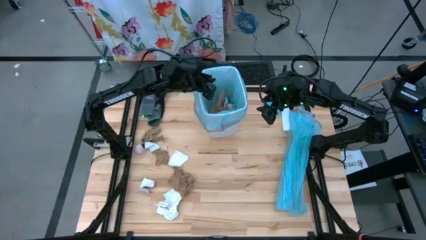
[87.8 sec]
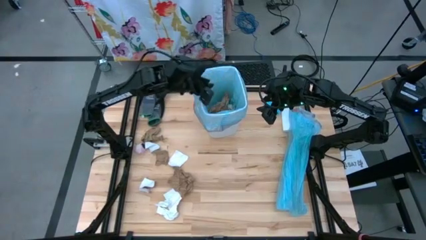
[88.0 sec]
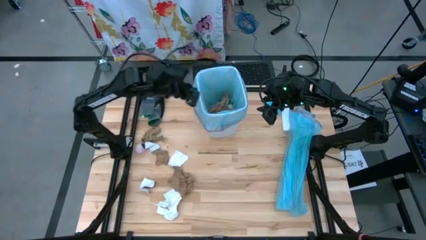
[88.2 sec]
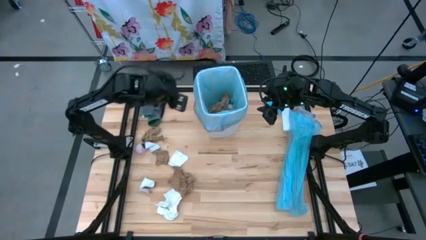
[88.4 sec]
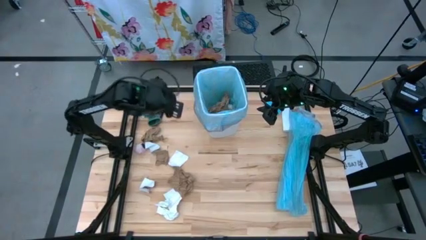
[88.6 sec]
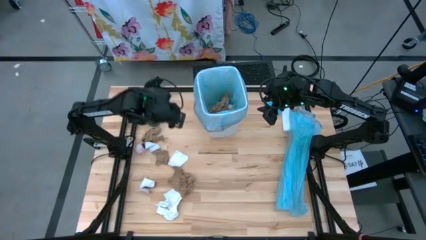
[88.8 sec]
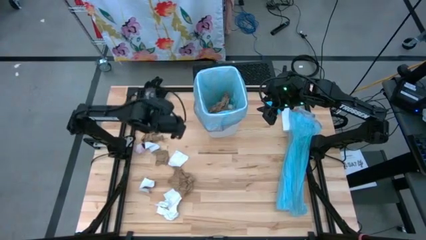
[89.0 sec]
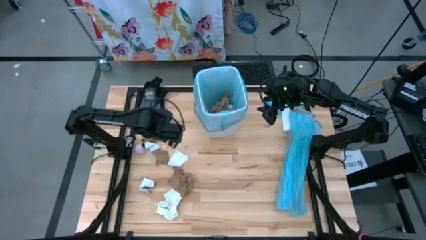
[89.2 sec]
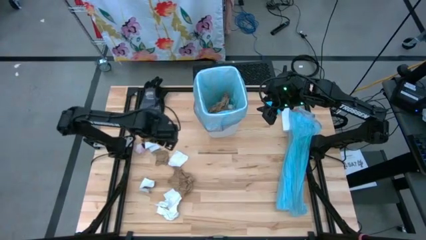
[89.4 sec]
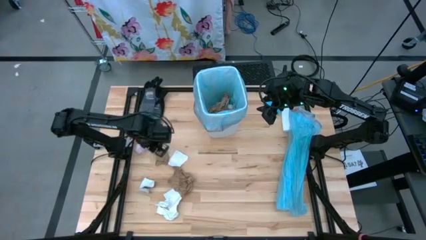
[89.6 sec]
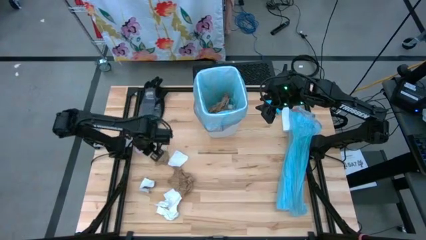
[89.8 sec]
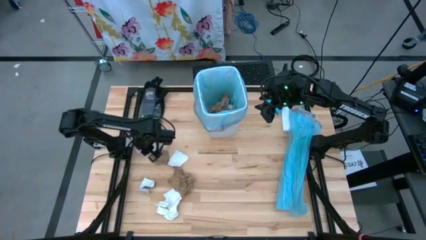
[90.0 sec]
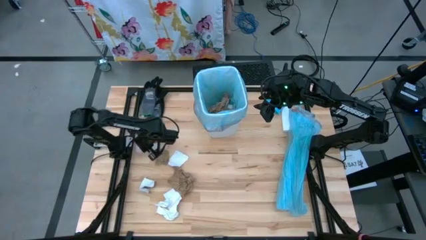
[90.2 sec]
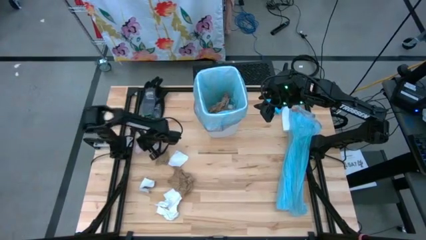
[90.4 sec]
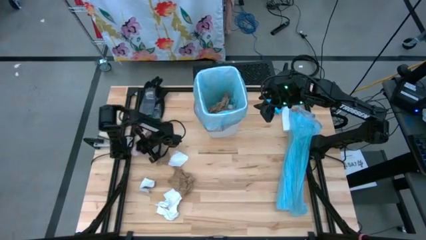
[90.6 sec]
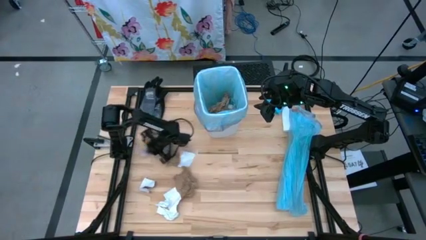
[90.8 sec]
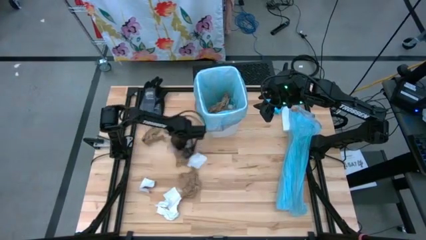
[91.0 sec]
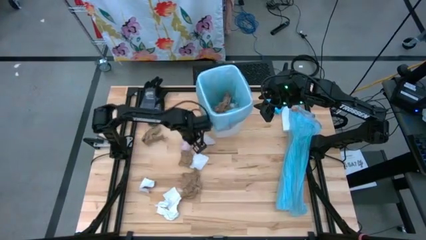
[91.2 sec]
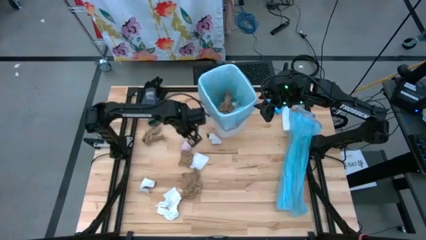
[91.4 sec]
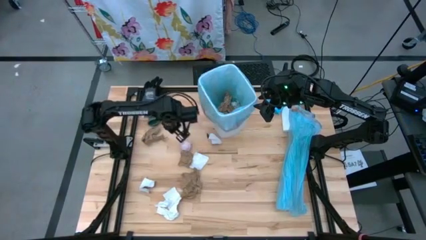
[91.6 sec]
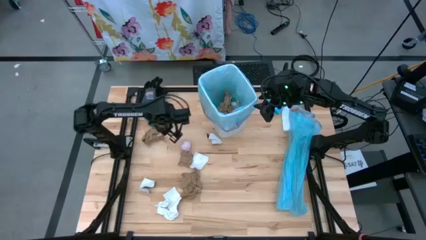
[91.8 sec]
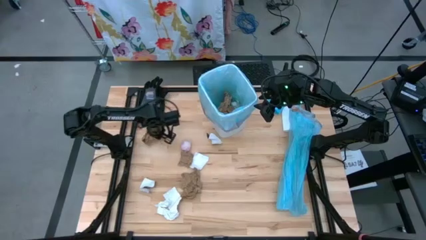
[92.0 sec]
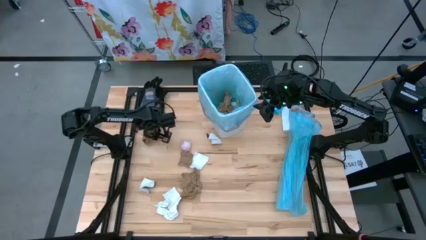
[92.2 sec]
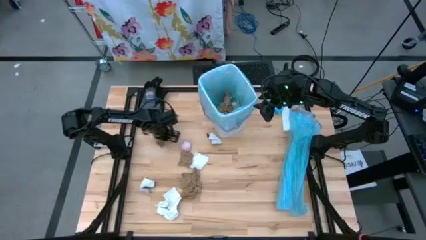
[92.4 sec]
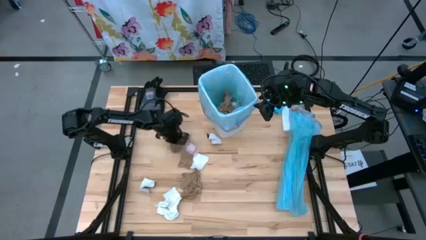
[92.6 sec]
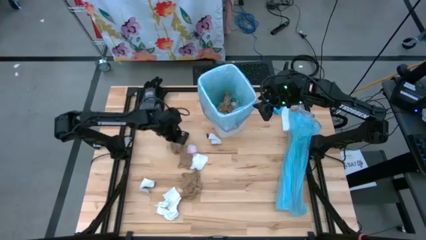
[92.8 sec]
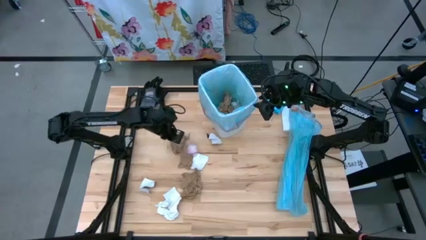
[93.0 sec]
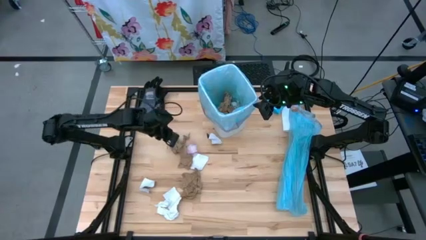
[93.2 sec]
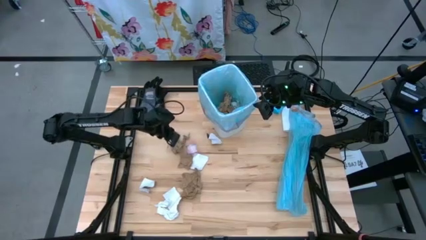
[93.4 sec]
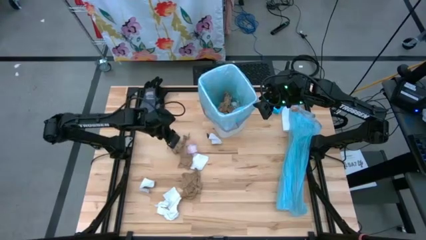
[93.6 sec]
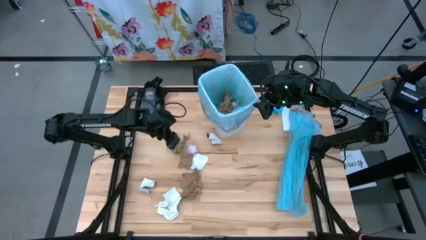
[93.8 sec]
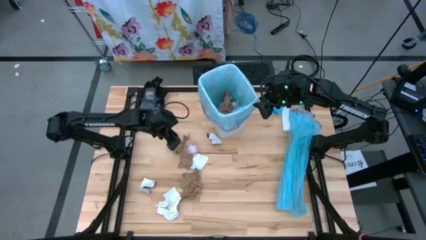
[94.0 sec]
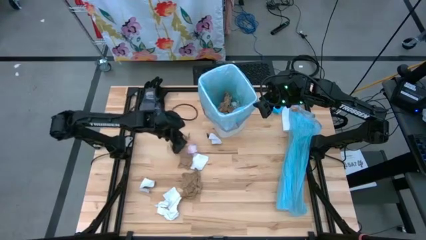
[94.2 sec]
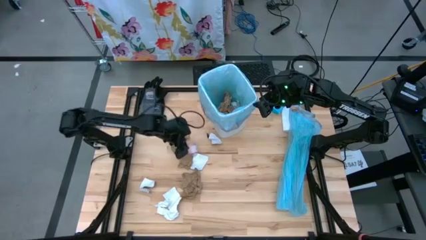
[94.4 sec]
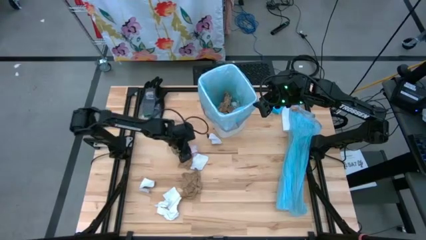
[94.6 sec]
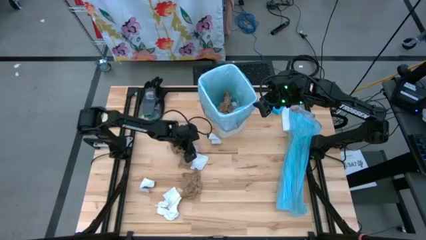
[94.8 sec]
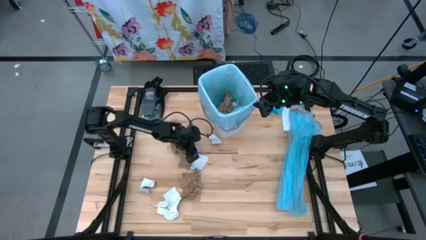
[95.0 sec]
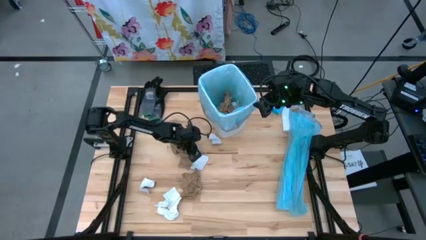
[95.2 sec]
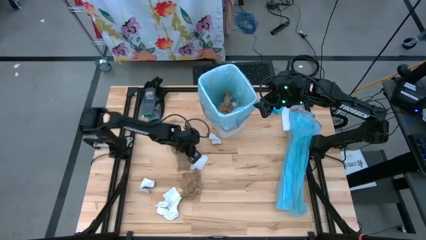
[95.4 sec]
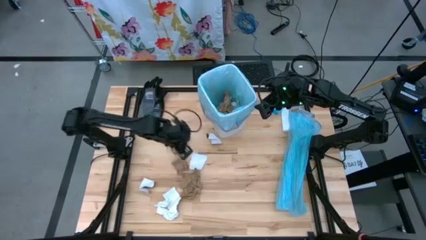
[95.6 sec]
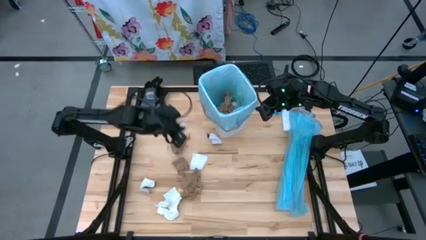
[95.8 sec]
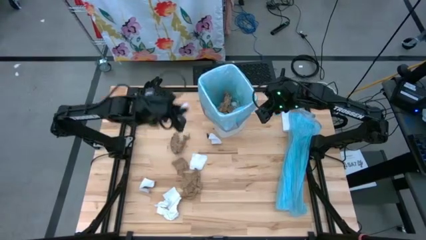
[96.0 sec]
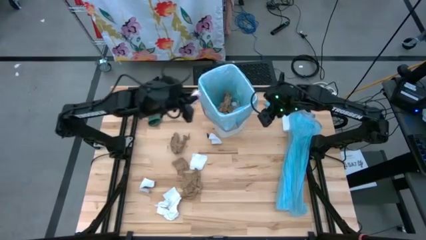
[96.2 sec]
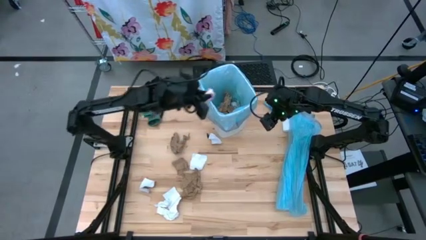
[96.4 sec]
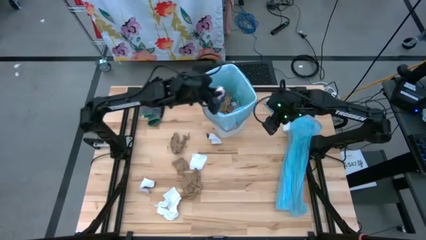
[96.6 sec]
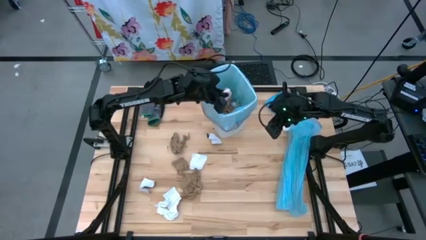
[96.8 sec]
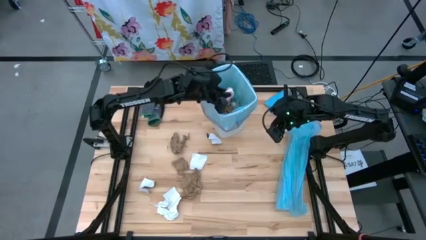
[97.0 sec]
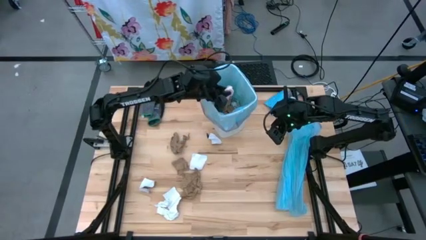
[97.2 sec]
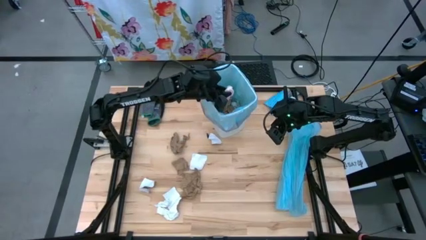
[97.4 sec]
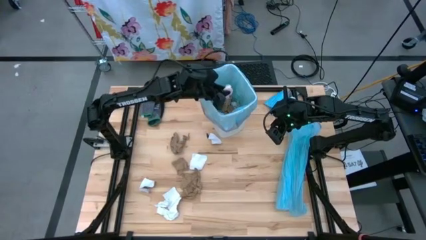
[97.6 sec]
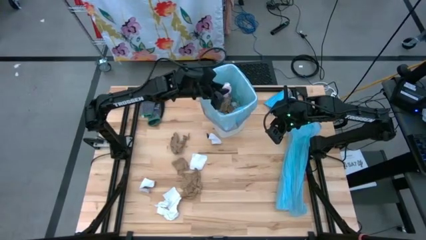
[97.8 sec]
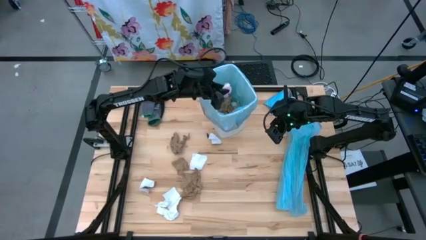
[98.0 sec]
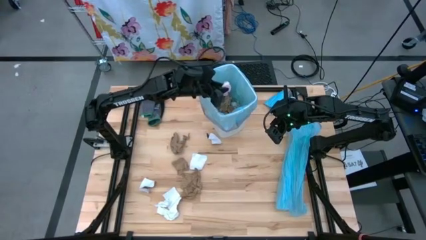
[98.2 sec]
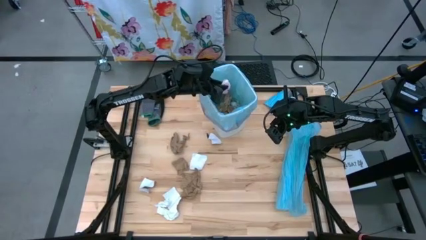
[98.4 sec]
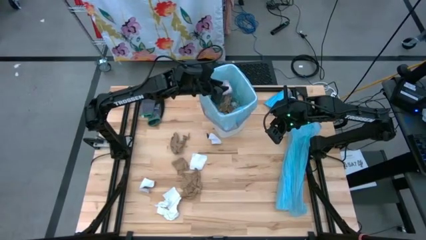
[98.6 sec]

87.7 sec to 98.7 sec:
Task: place trash/remove bag and relplace
Put the pink plastic into the trash bin

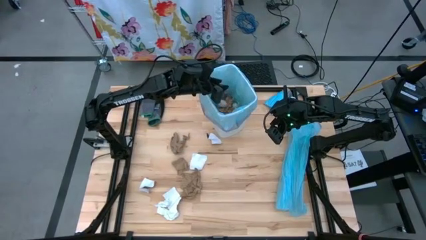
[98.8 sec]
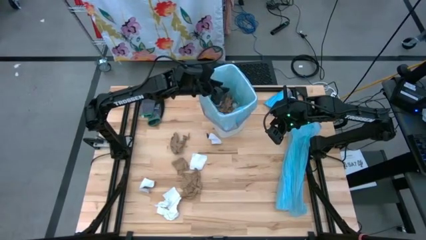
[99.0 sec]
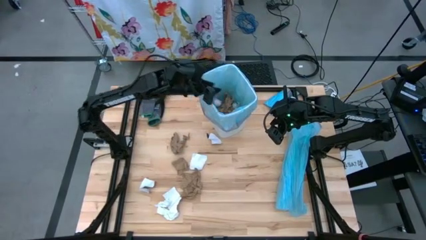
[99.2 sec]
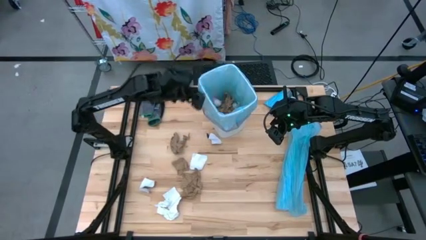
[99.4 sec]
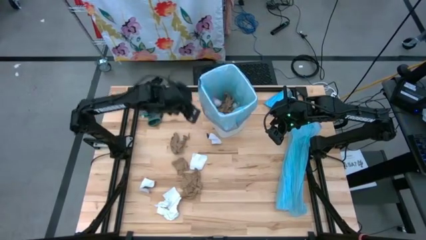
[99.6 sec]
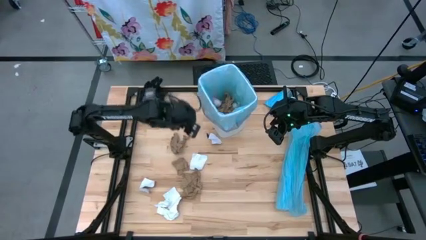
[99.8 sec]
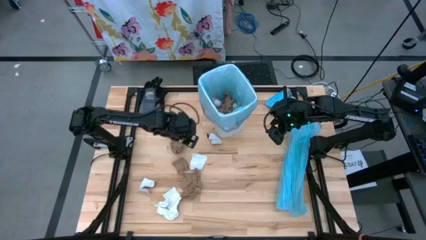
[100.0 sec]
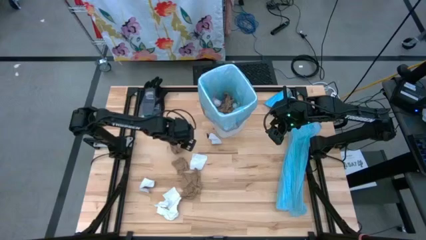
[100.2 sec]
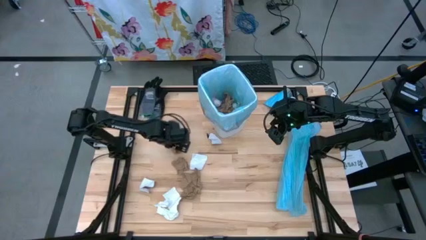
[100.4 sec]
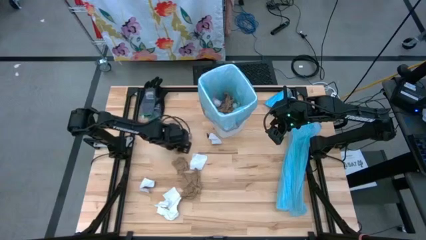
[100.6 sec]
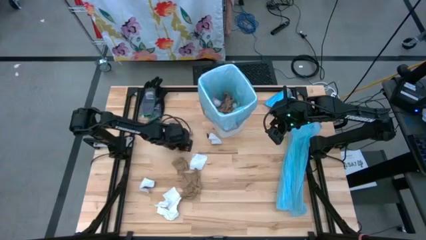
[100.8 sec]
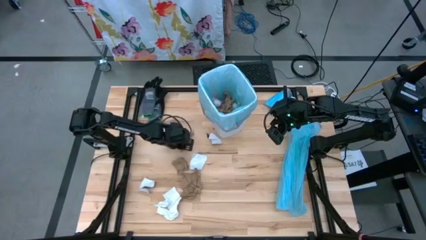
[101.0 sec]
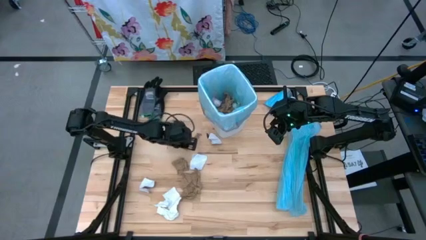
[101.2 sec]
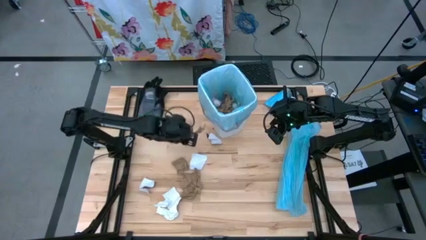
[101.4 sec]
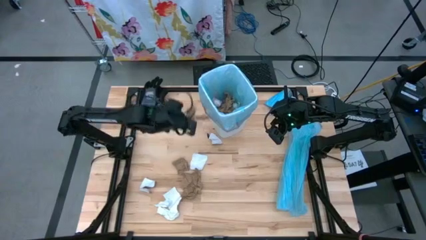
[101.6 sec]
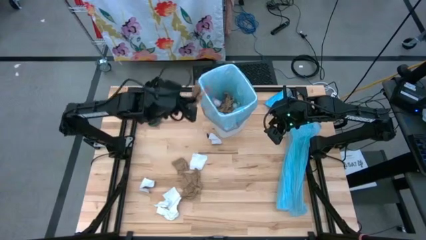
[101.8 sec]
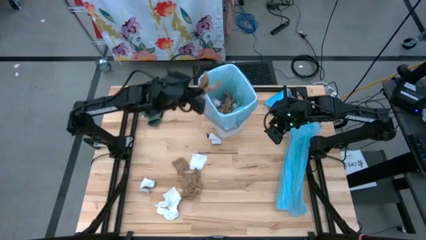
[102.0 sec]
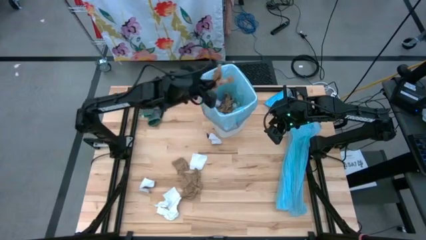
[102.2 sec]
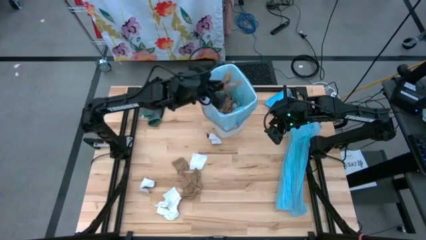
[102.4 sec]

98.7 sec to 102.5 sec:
Put the brown napkin into the trash bin

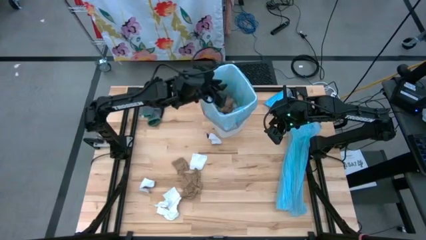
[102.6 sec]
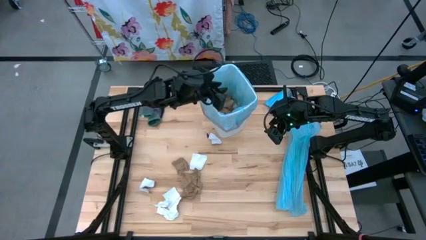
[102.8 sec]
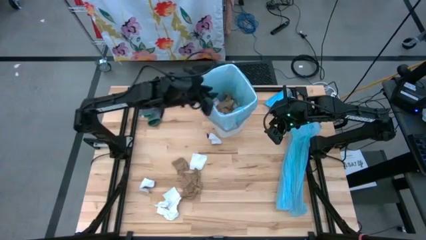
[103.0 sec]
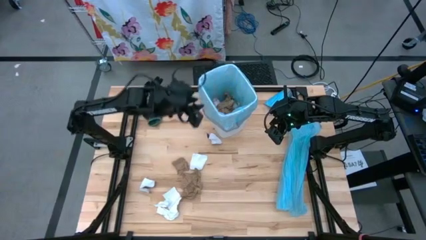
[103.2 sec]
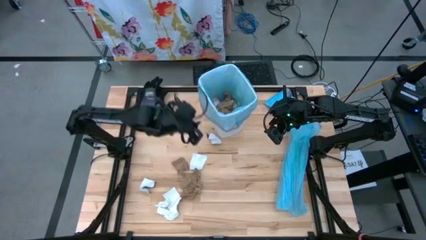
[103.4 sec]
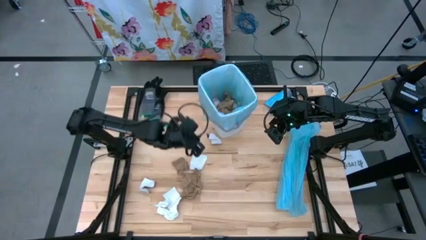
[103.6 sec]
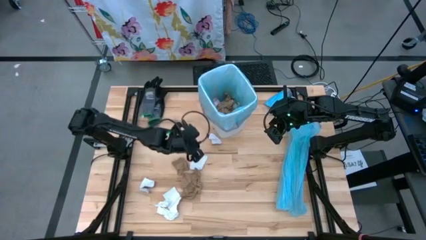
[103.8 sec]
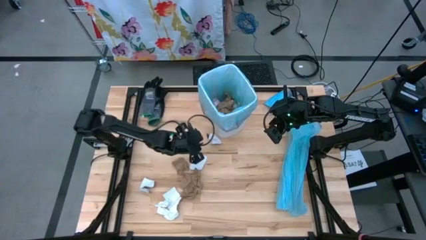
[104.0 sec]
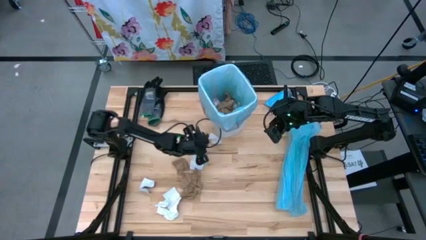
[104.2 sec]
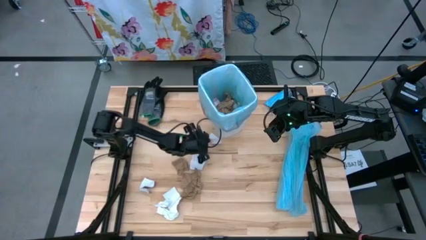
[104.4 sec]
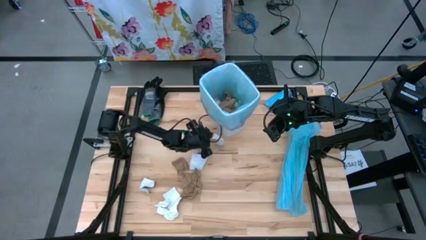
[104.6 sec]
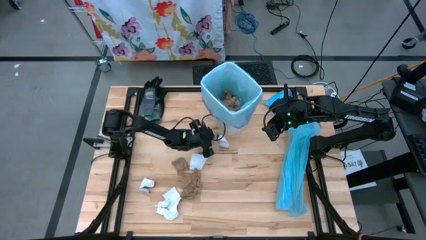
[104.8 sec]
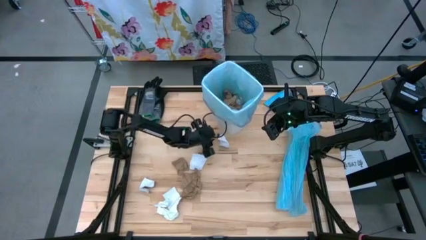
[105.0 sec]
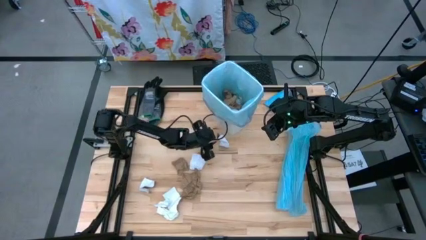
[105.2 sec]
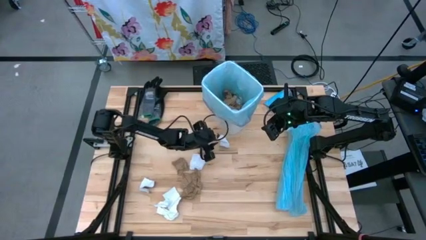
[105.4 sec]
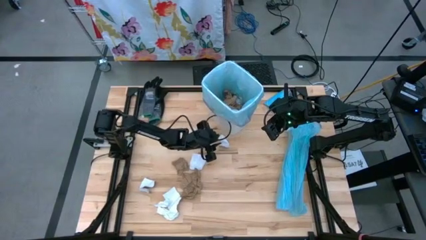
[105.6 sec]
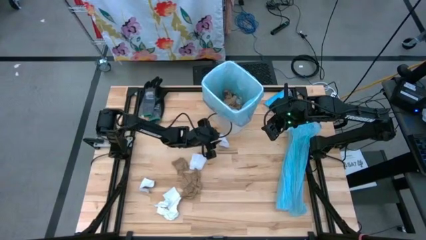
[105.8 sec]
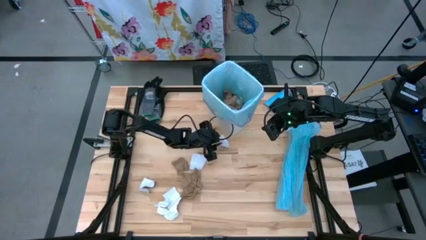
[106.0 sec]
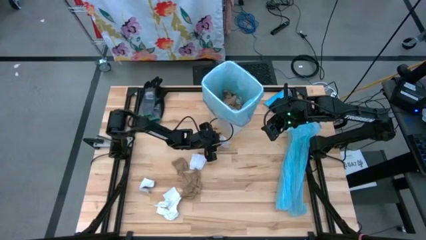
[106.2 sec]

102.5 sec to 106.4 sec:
Put the right white paper into the trash bin
